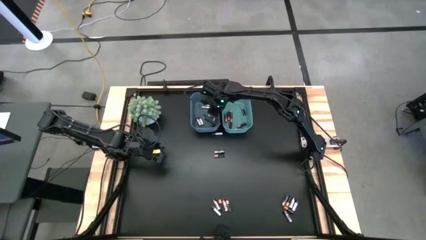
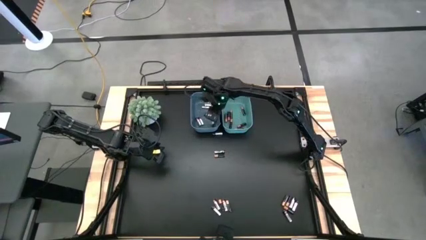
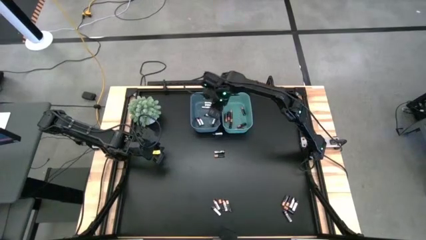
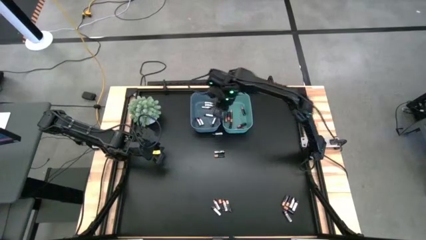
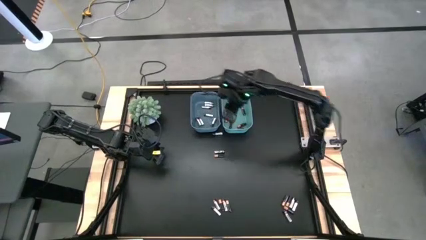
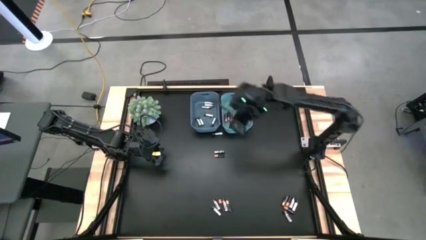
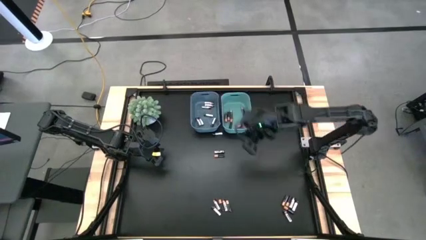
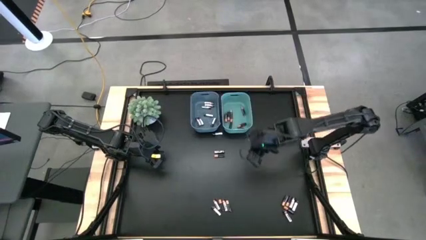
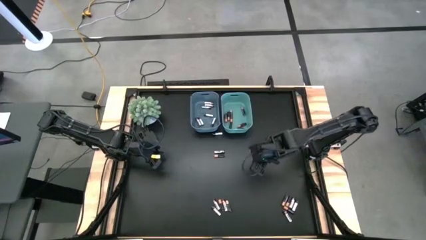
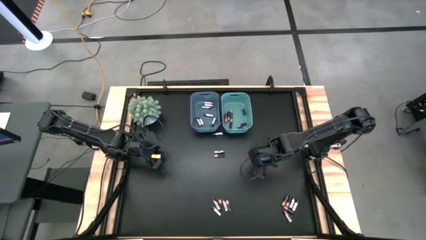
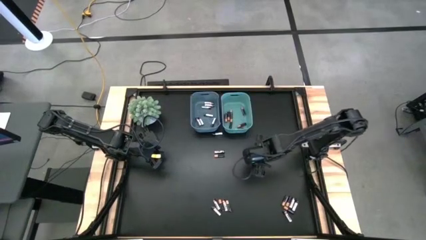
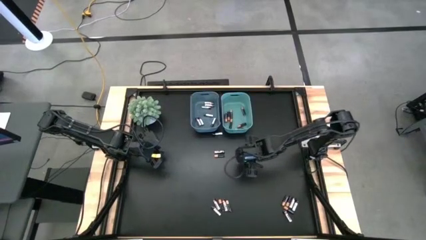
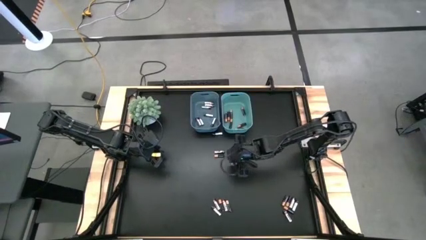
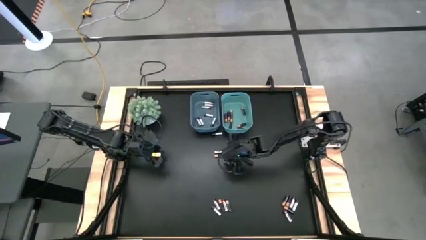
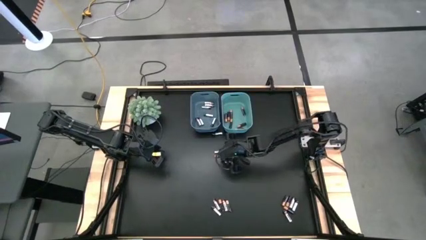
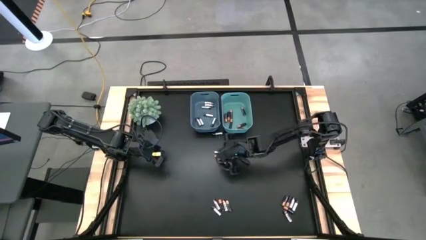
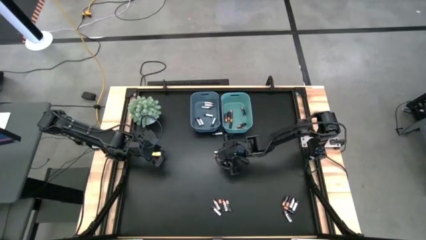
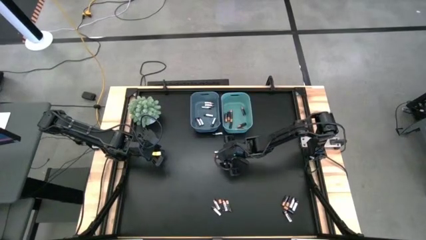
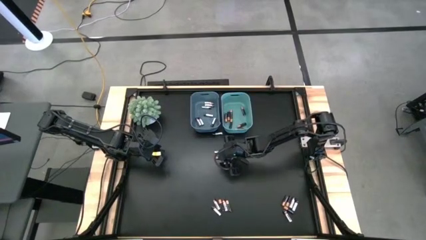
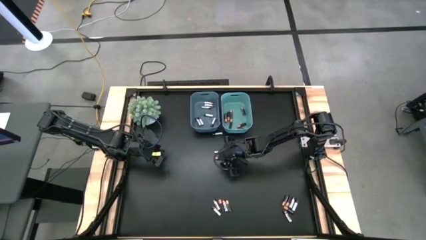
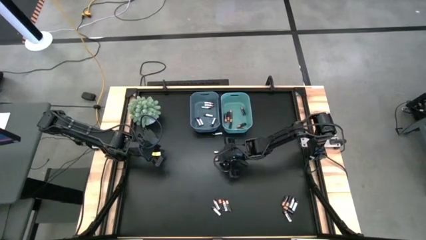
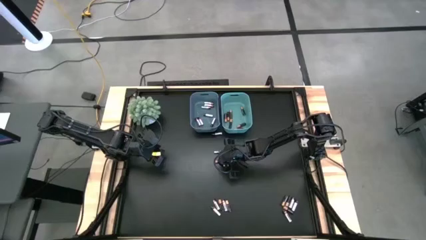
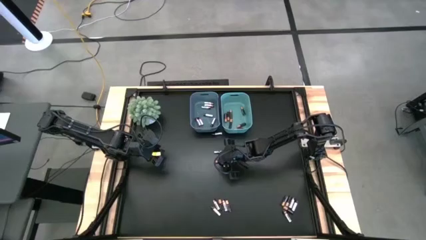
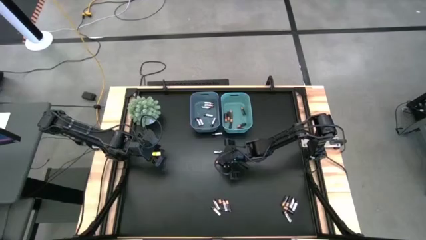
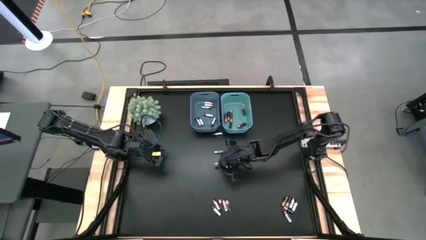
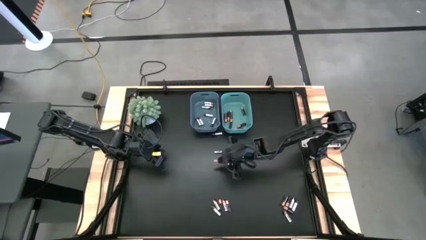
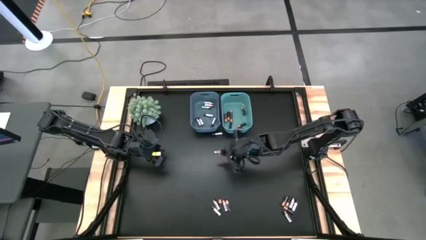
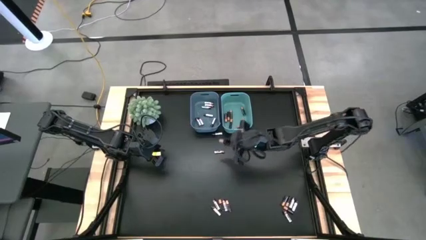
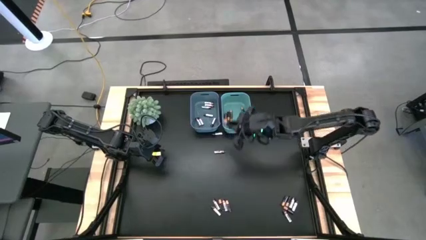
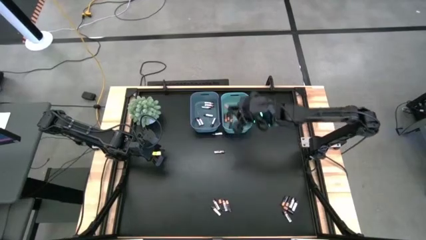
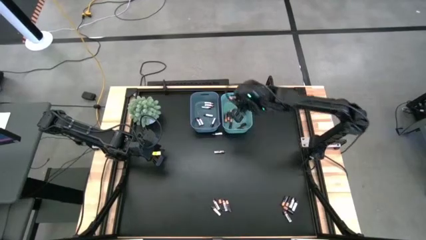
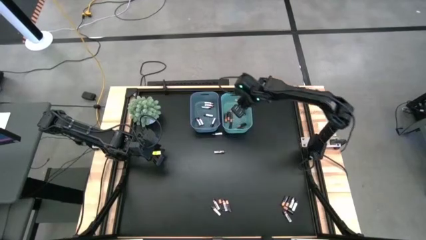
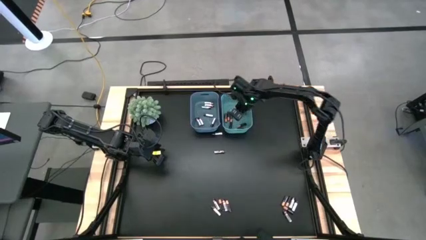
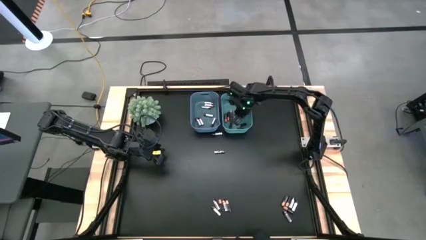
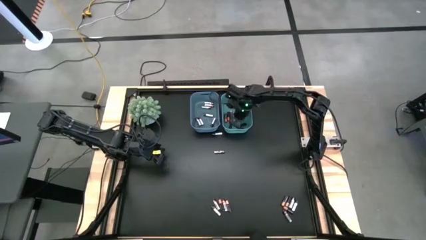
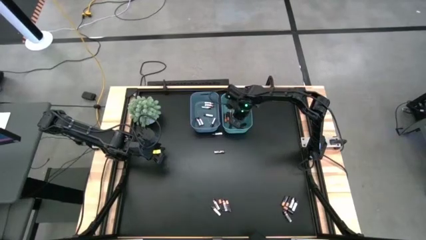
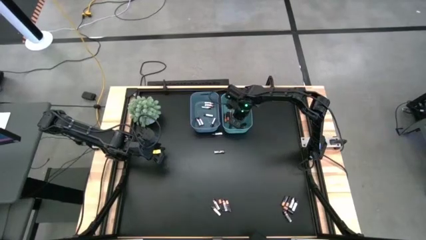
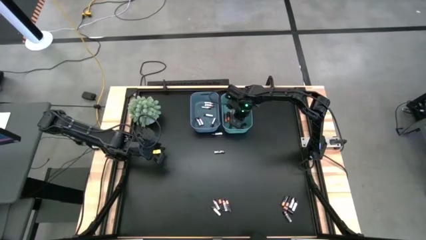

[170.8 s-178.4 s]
Task: Sort batteries
Put the black battery into the green bin

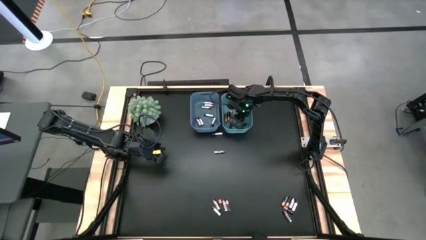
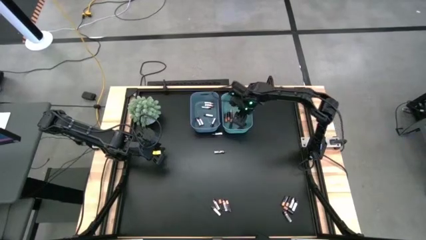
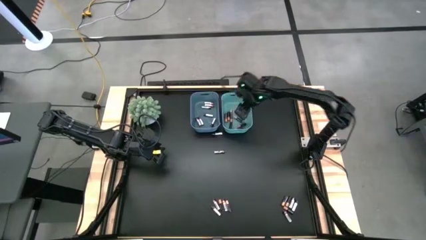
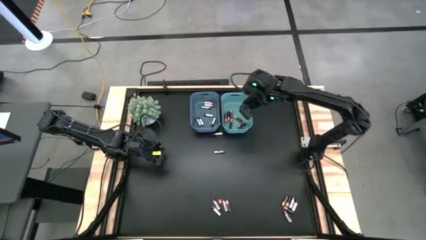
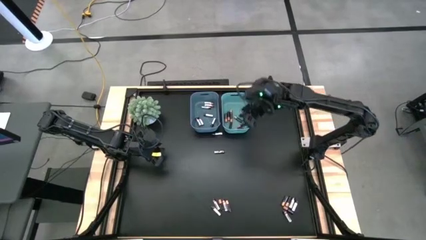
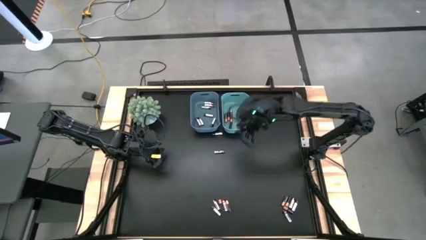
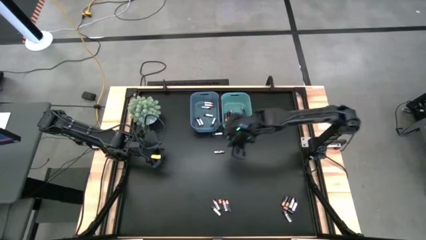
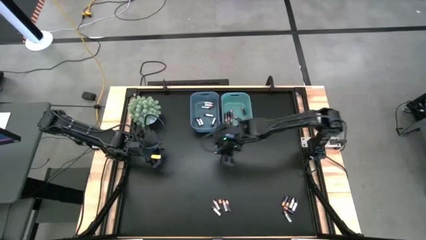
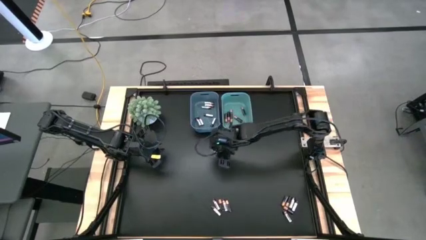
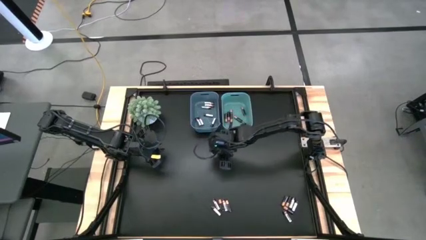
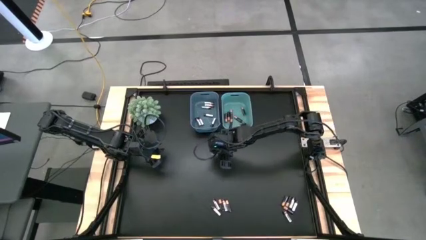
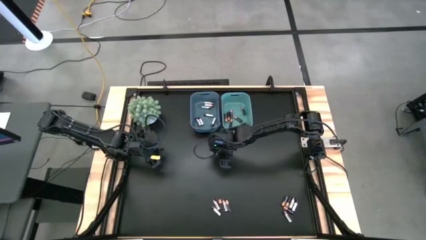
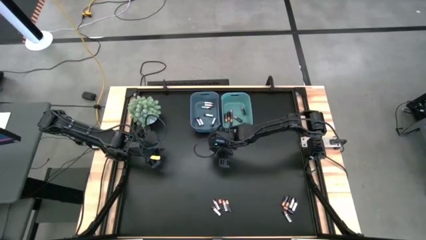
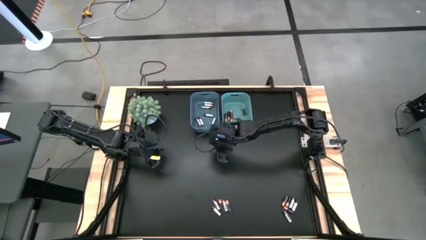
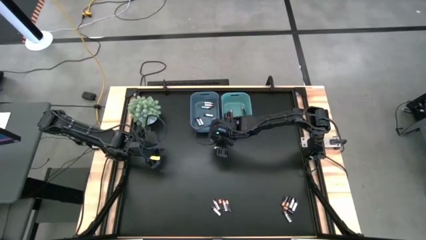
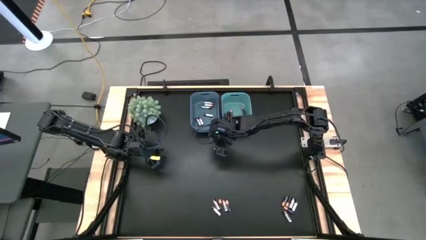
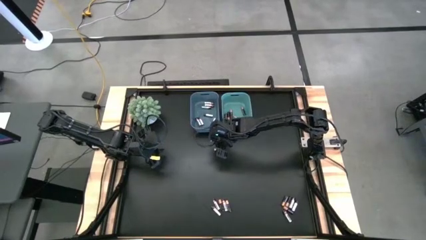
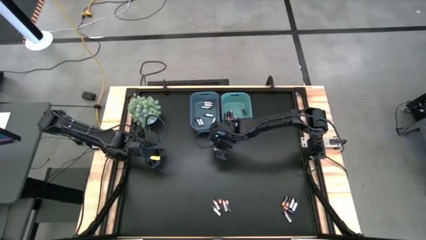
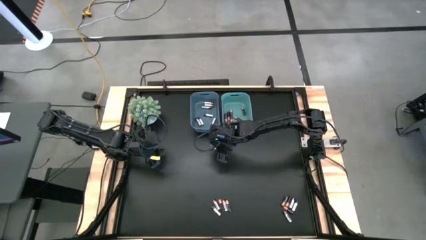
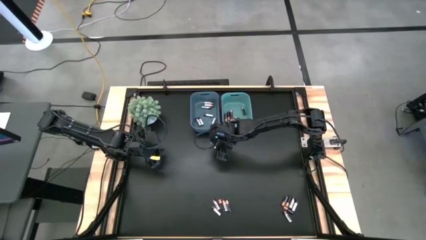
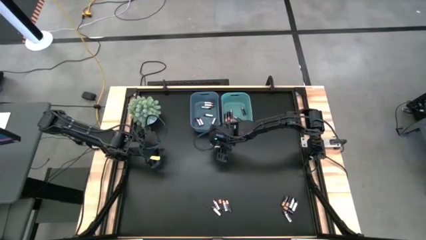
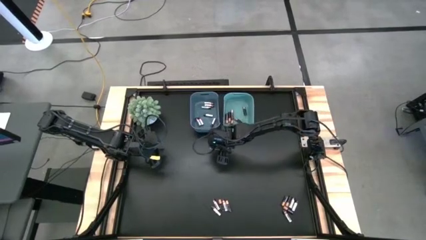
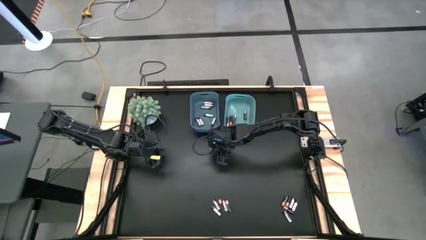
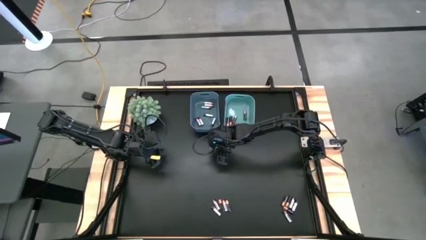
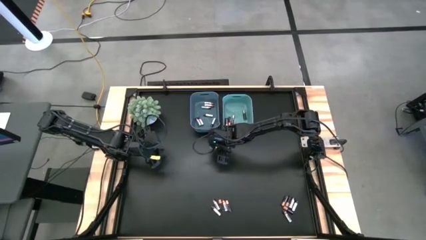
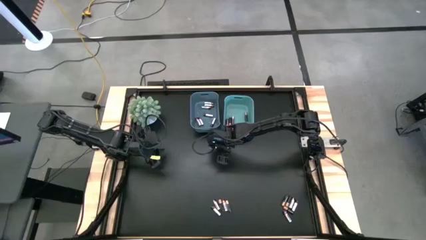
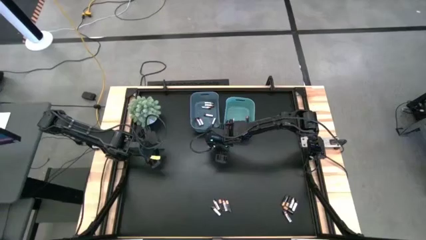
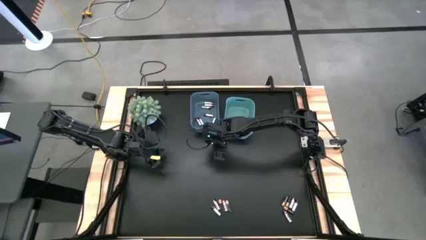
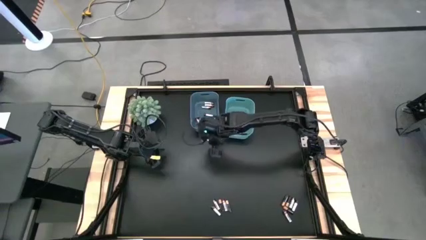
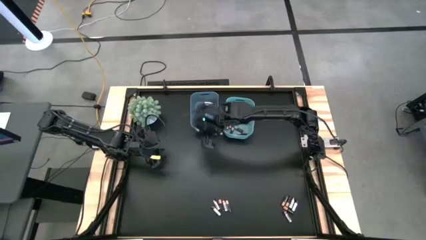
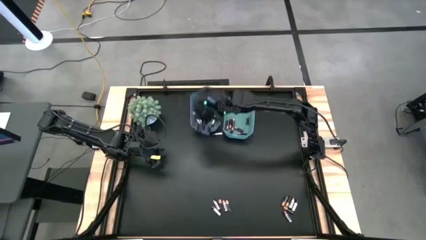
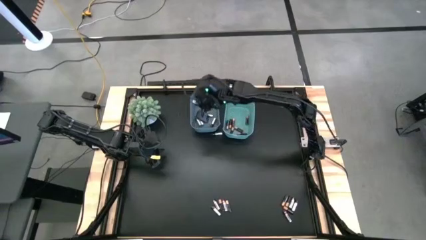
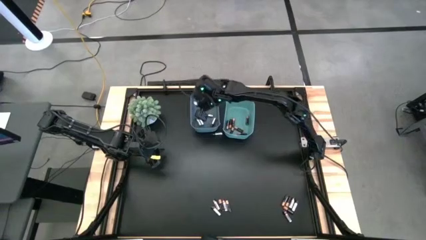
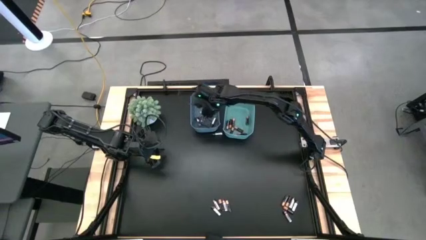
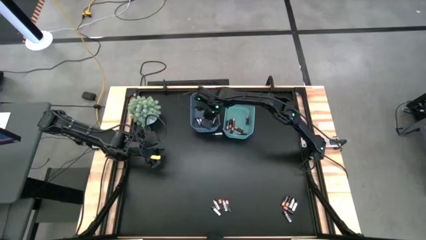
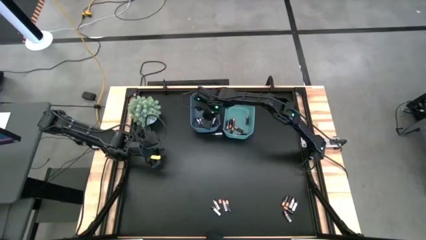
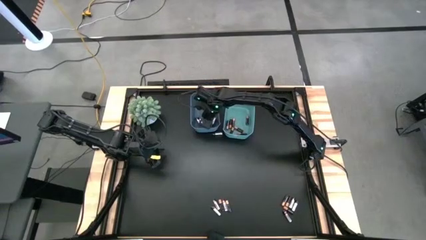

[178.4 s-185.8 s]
Put the silver battery into the blue bin

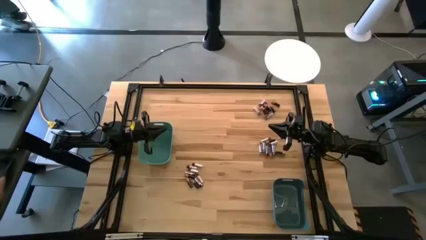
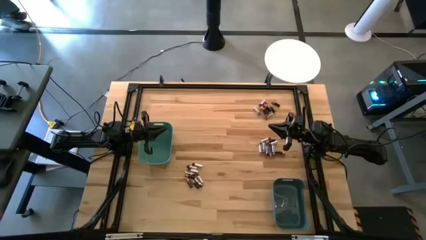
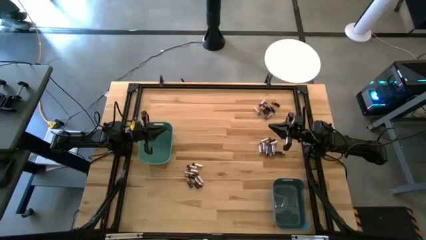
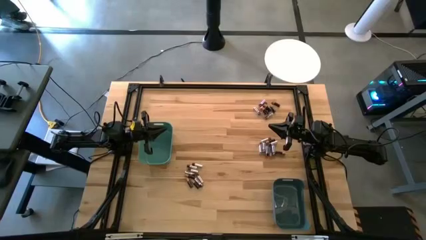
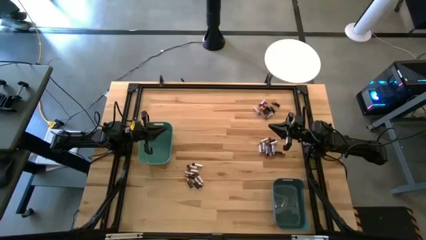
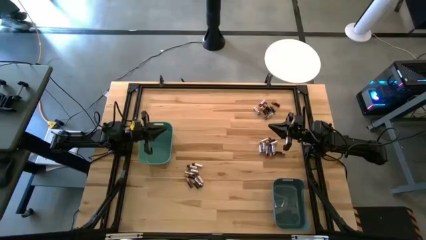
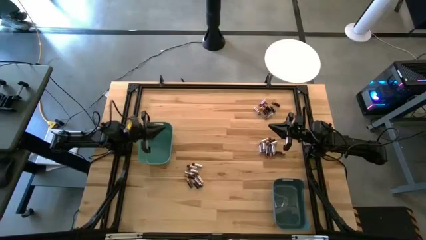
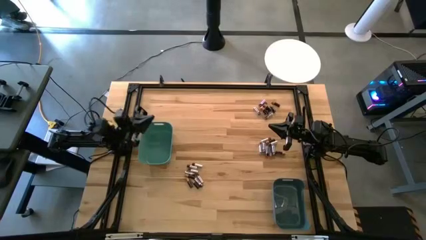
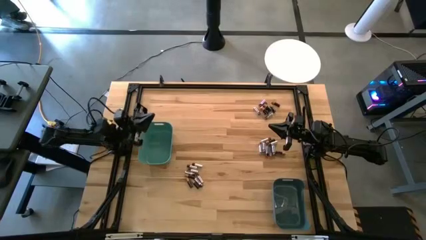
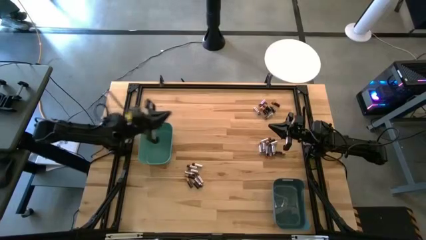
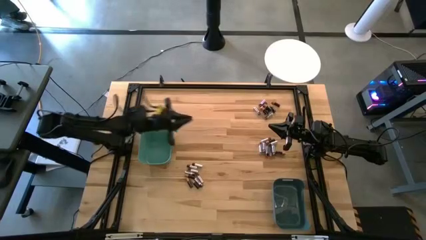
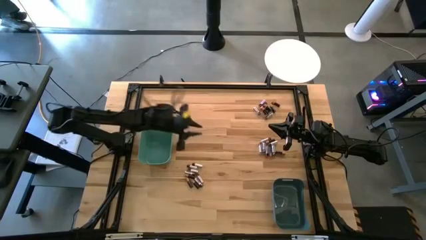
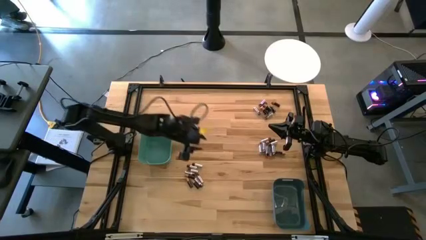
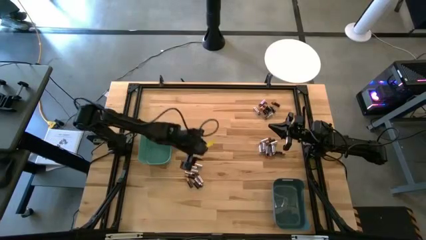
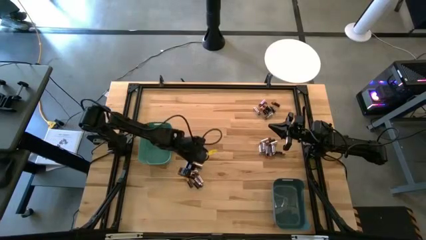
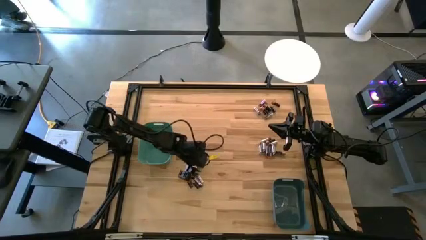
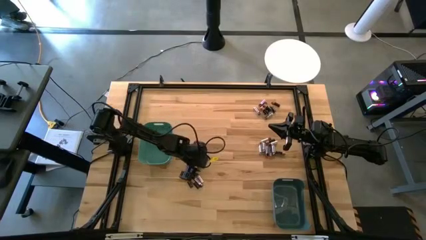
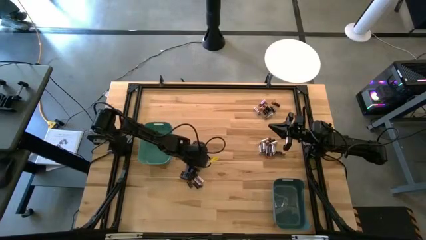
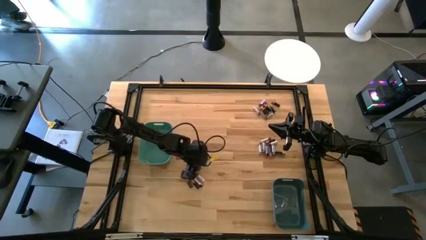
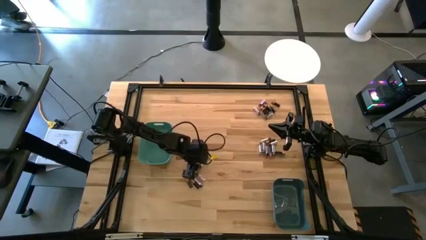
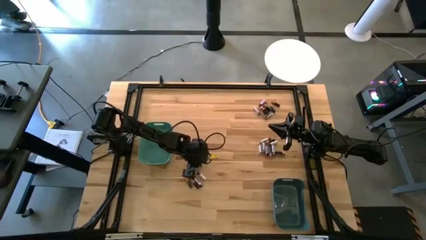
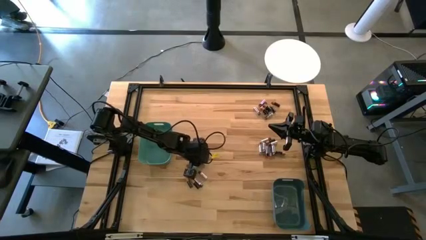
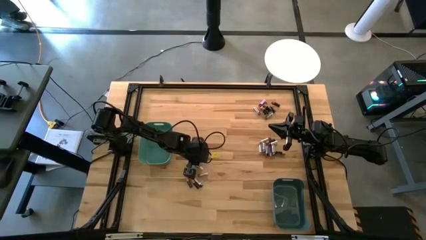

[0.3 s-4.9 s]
Task: Sort batteries
Put the silver battery into the green bin
